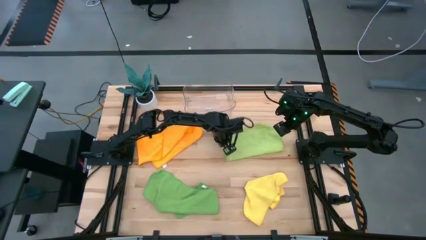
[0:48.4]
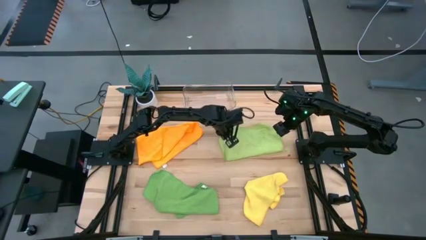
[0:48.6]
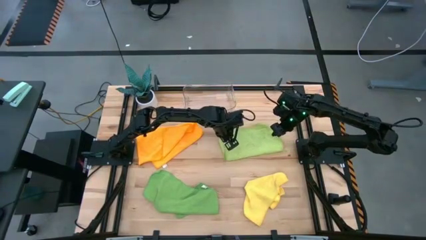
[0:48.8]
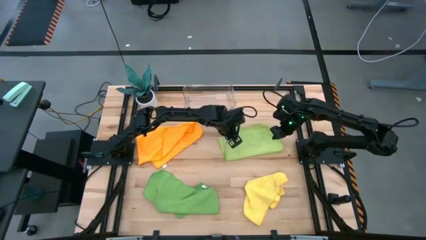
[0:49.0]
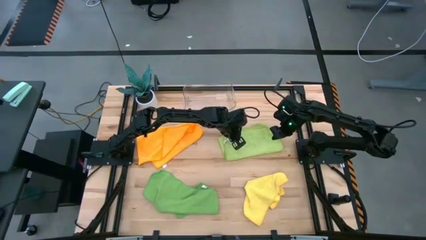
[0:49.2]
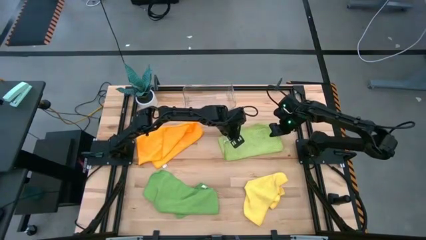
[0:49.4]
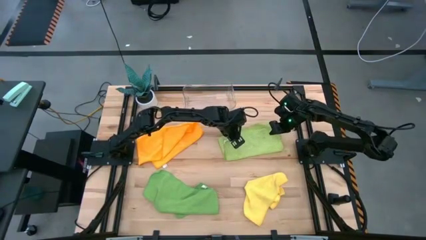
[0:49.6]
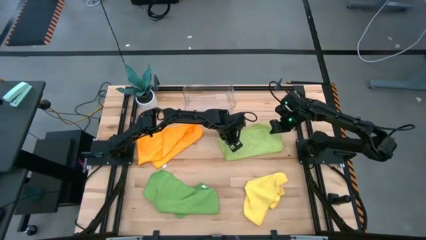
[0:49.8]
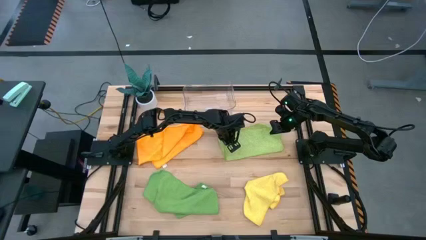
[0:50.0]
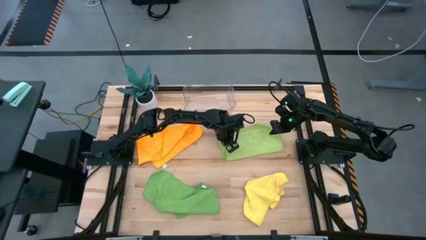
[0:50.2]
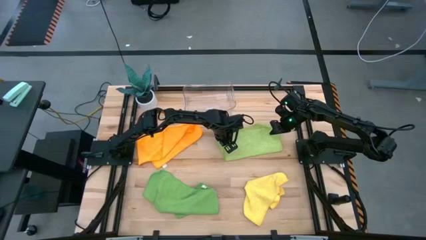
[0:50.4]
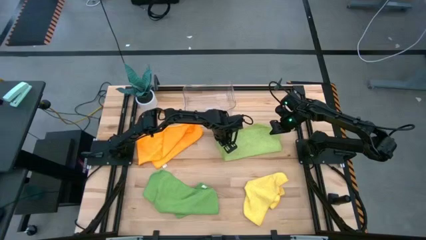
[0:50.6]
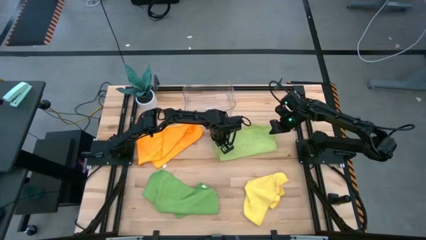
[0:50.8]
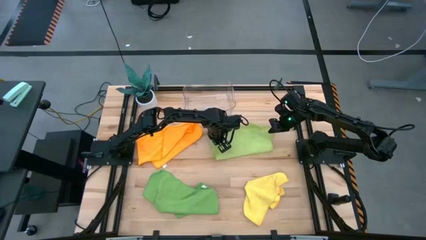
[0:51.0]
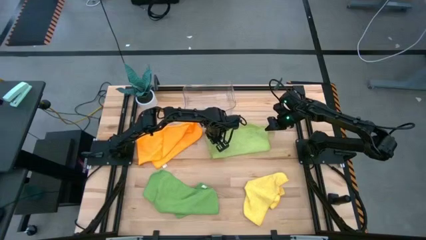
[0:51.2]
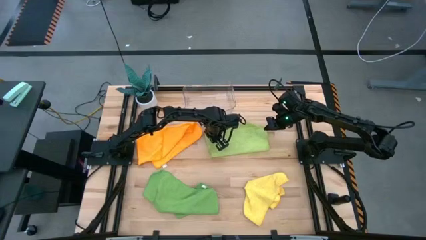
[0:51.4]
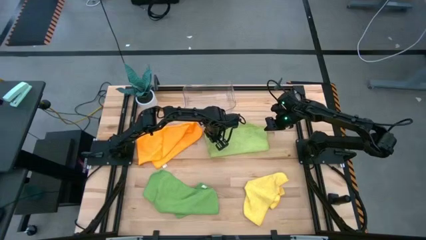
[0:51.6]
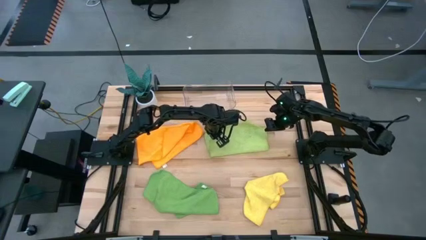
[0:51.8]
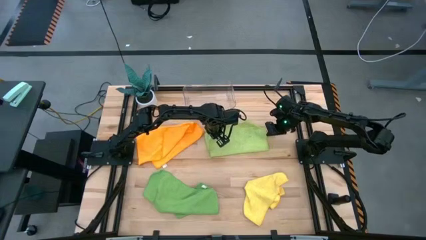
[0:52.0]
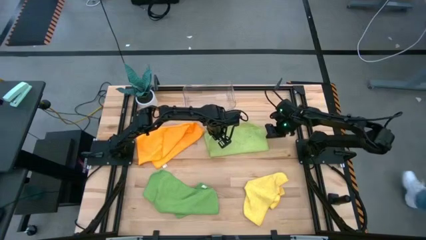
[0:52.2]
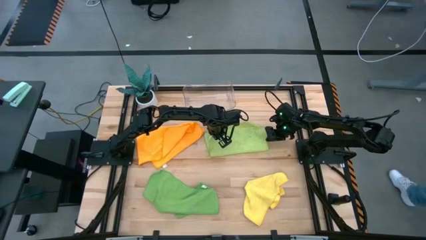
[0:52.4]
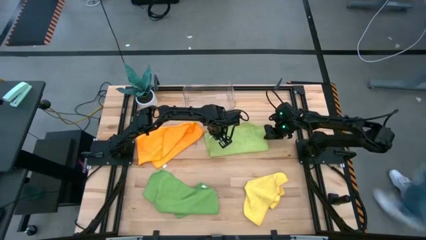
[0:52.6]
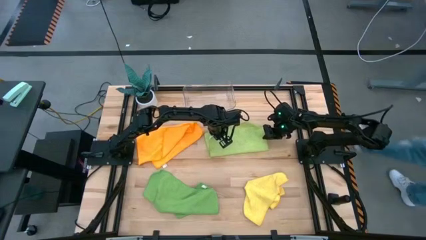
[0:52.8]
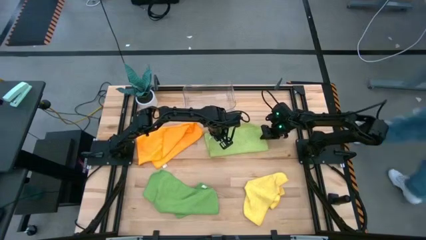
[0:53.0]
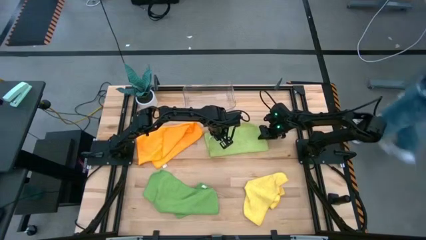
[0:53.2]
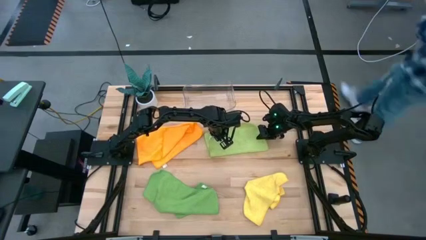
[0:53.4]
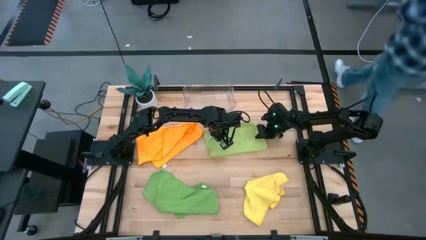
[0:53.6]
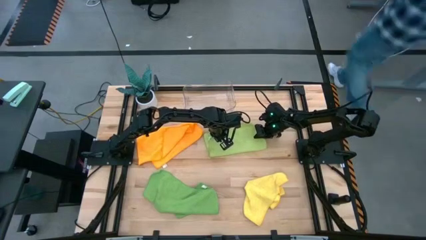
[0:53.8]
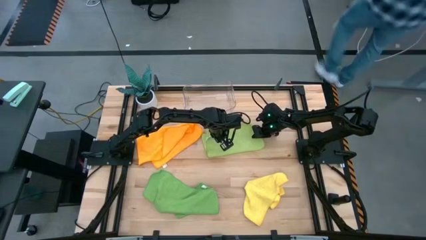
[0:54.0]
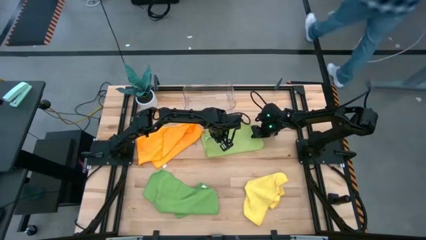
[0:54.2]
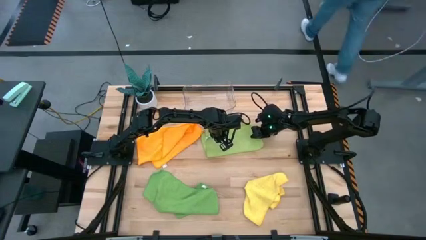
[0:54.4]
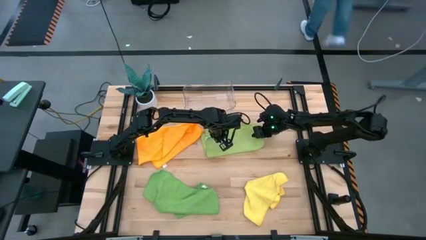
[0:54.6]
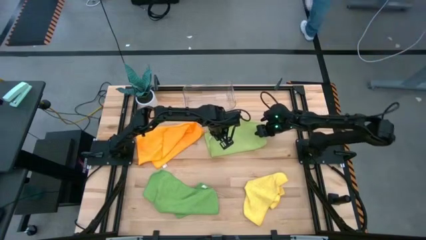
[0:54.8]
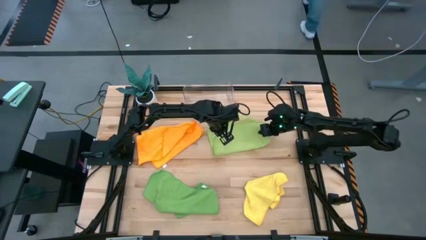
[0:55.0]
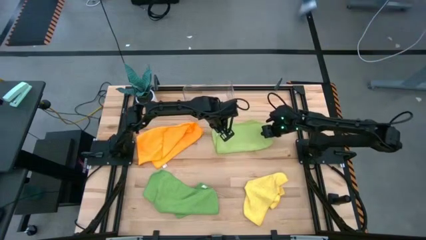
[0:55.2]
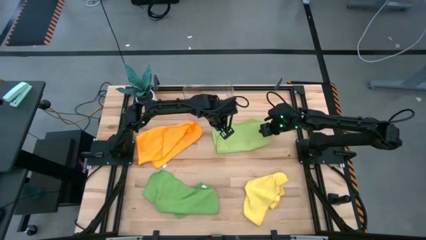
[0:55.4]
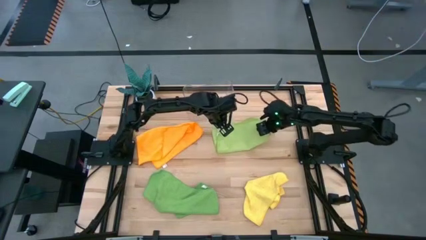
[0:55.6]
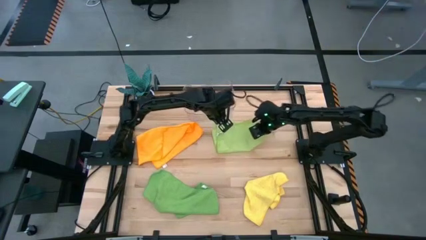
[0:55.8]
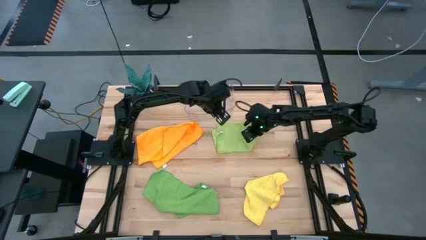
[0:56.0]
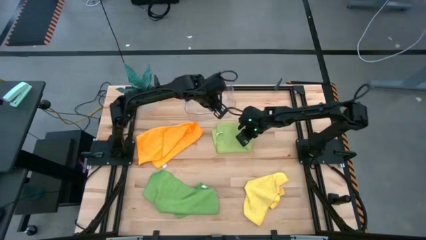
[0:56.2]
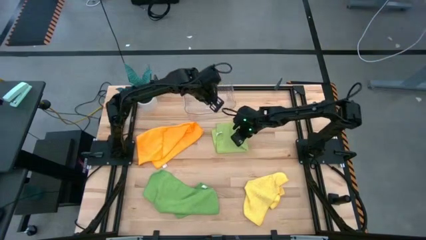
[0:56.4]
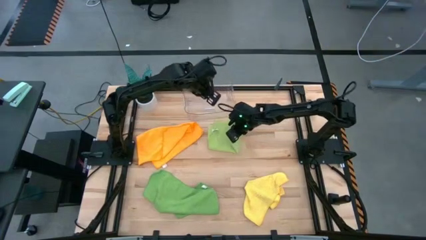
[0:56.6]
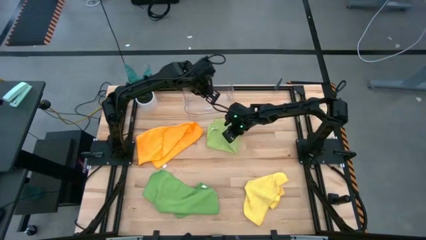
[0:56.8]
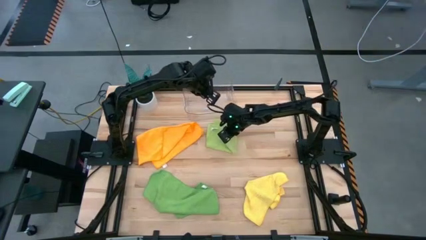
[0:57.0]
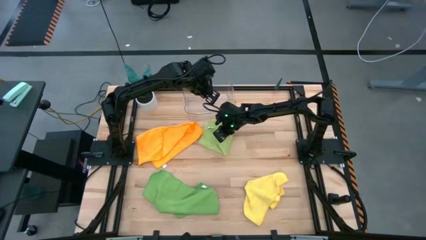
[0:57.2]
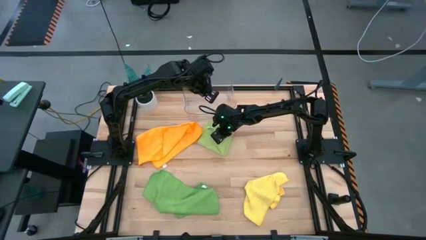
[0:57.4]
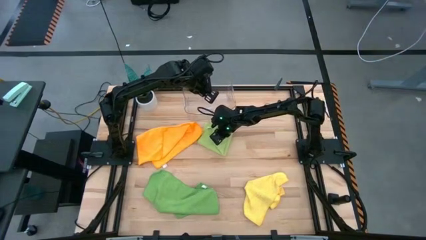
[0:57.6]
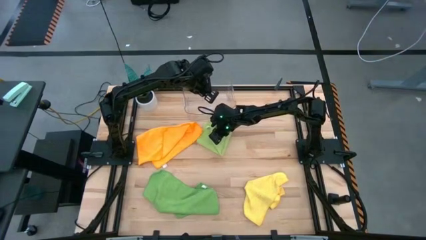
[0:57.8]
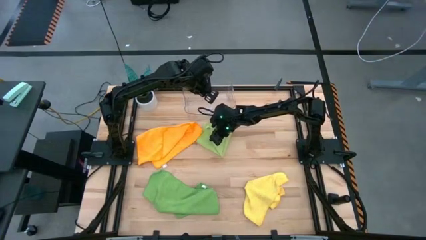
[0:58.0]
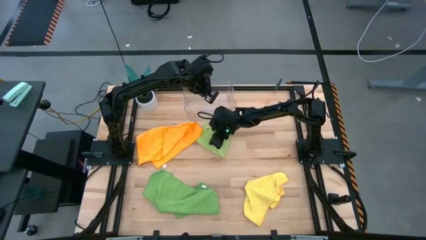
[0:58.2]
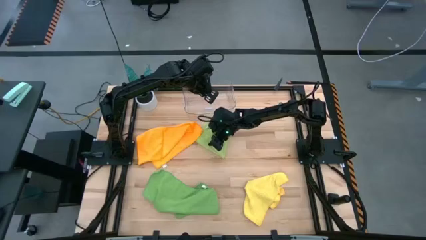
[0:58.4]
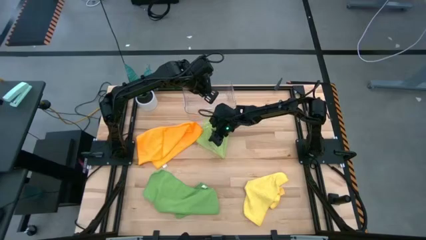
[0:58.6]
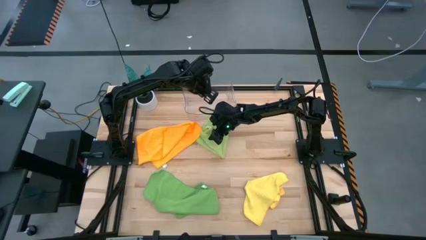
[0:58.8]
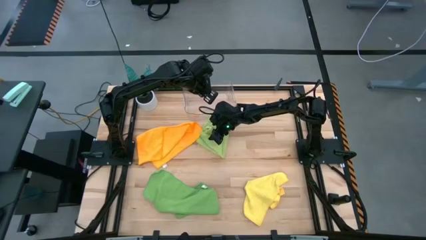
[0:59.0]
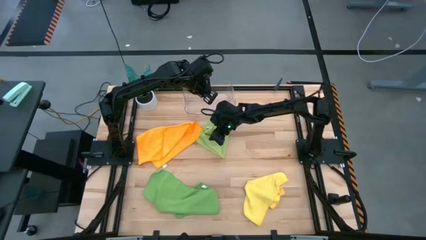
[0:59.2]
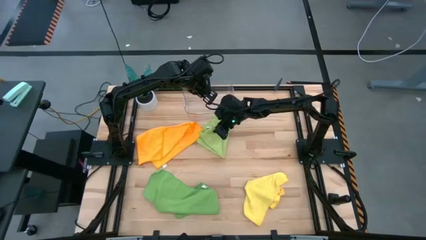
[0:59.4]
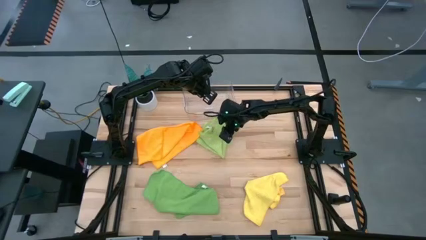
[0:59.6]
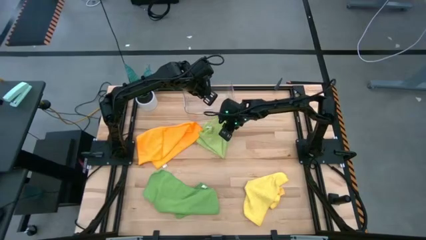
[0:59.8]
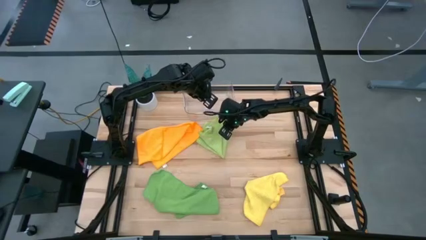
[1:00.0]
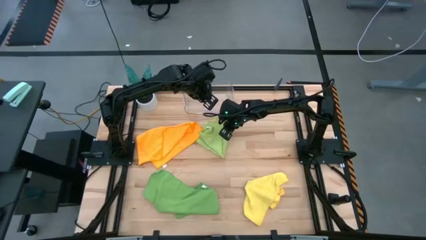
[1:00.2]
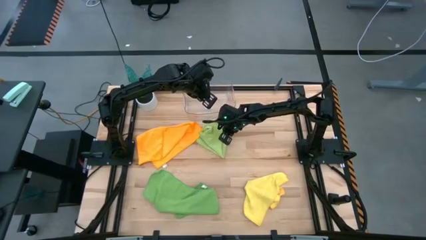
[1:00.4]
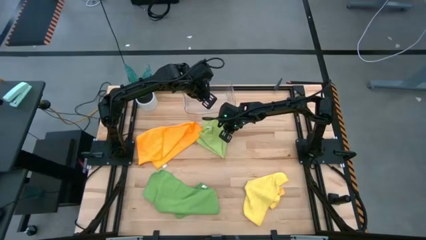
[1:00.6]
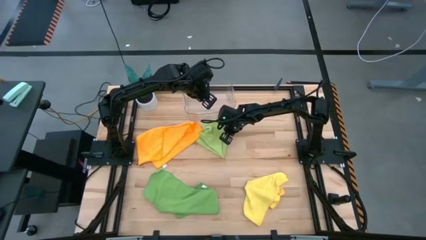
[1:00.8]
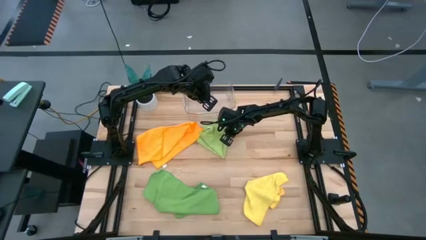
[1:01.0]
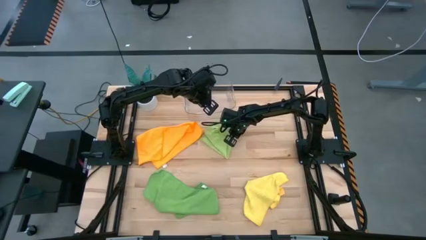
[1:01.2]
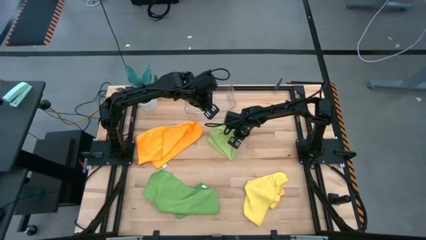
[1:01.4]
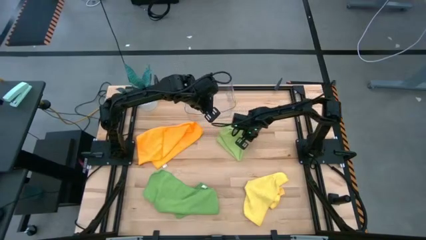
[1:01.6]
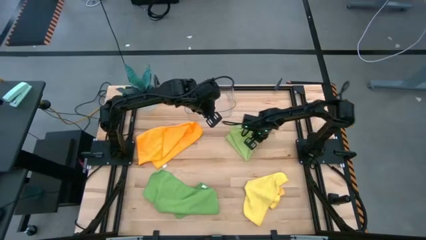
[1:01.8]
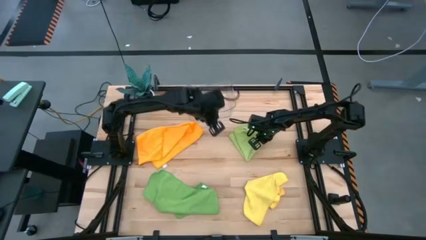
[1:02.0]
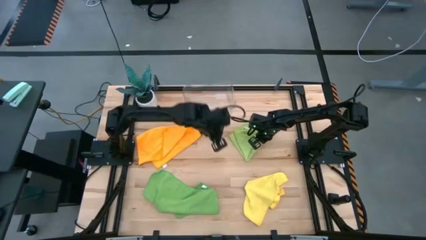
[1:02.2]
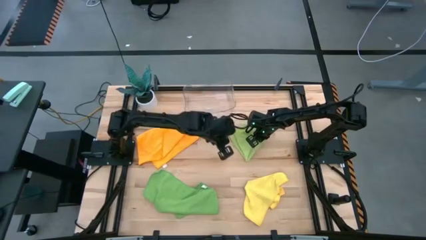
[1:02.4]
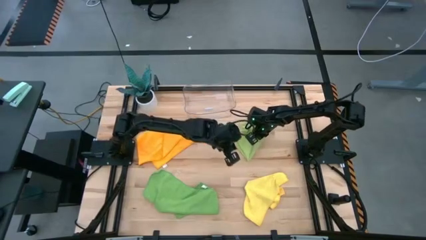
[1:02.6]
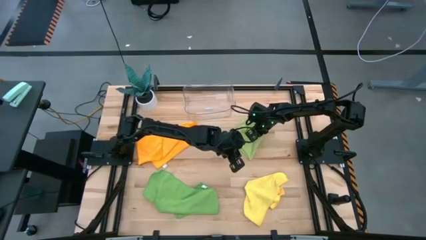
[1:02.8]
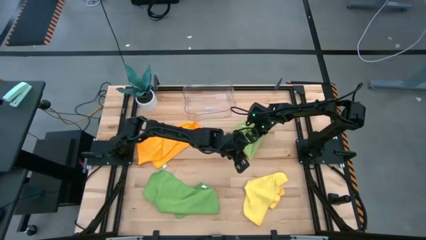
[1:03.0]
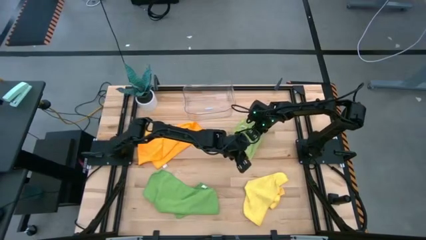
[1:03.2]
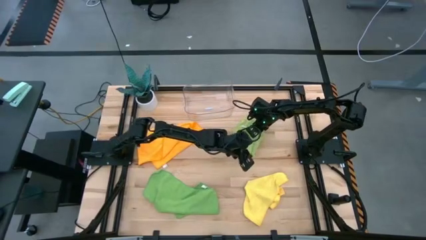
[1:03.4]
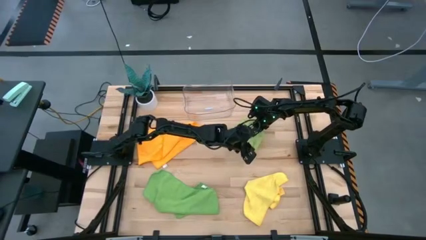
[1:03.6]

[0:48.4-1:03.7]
Task: Fold microfiber towels
Fold the light green microfiber cloth
